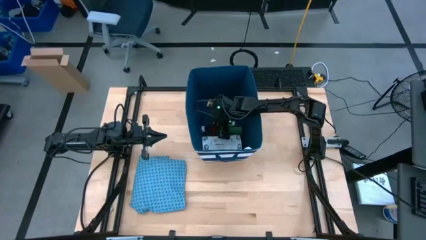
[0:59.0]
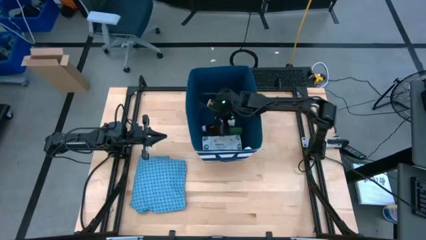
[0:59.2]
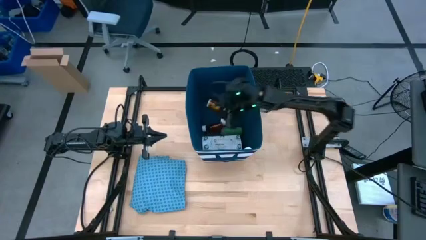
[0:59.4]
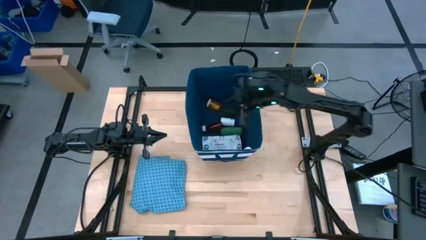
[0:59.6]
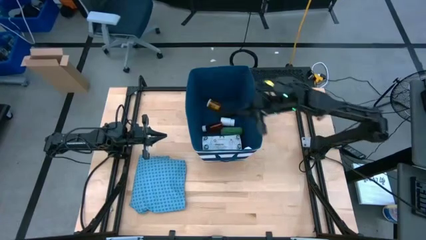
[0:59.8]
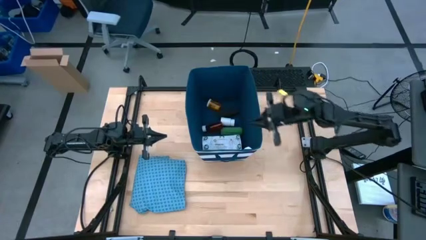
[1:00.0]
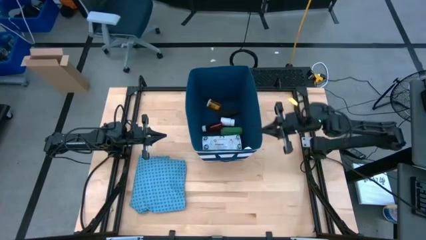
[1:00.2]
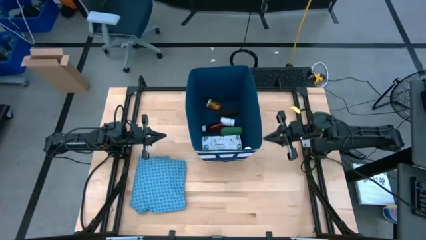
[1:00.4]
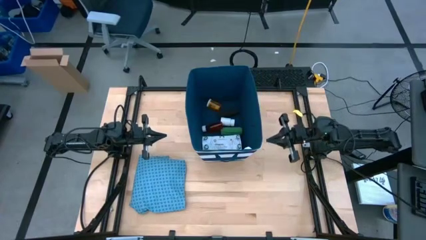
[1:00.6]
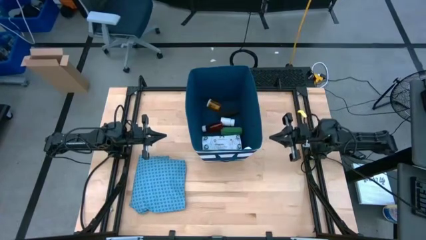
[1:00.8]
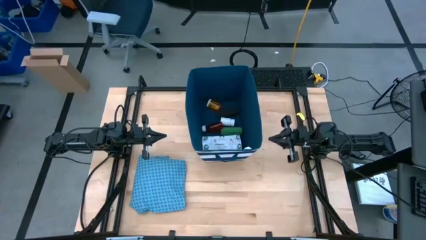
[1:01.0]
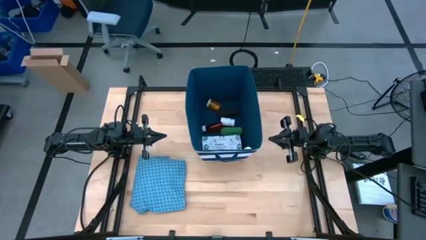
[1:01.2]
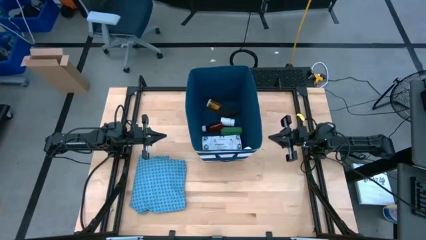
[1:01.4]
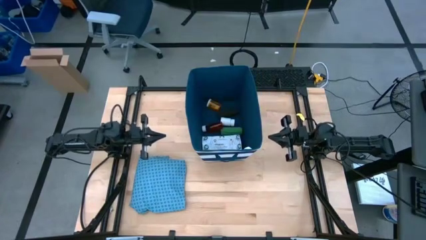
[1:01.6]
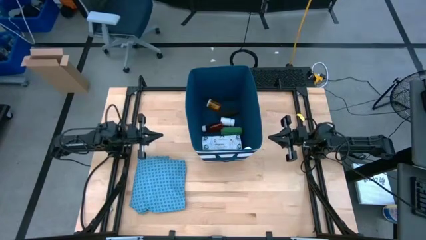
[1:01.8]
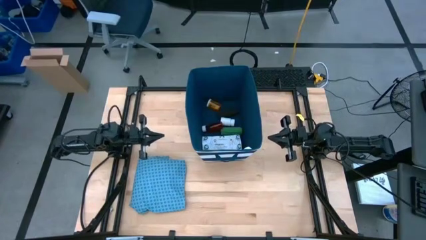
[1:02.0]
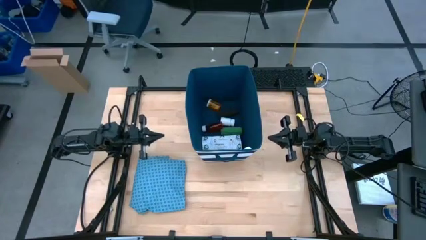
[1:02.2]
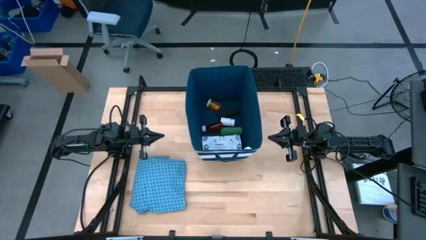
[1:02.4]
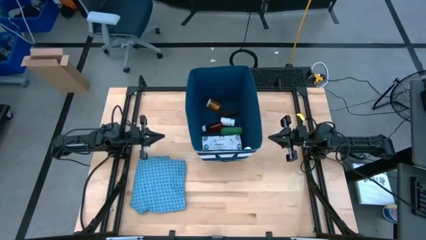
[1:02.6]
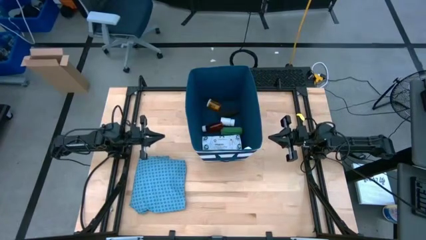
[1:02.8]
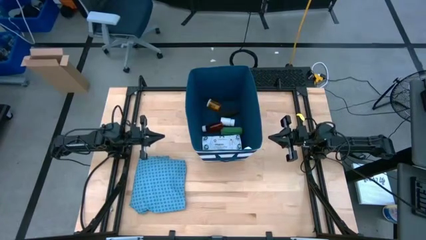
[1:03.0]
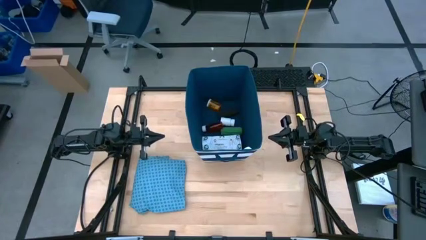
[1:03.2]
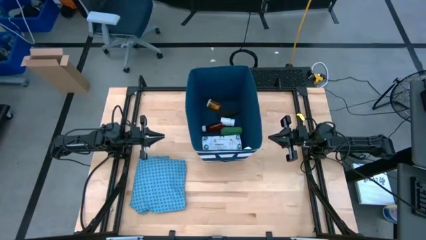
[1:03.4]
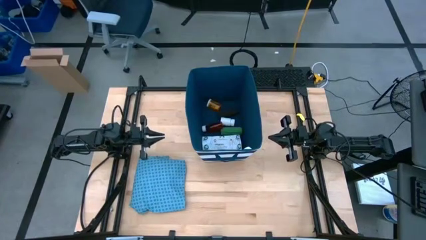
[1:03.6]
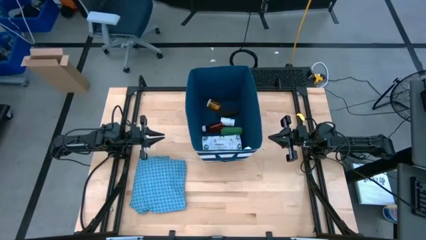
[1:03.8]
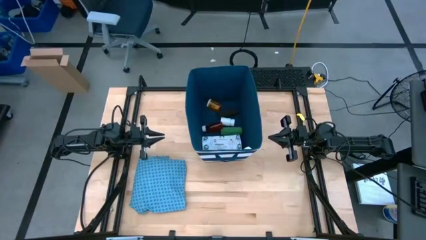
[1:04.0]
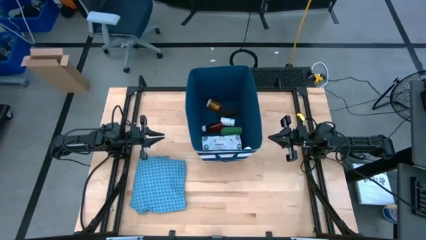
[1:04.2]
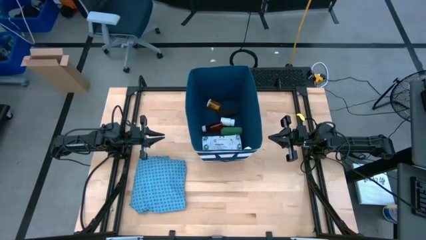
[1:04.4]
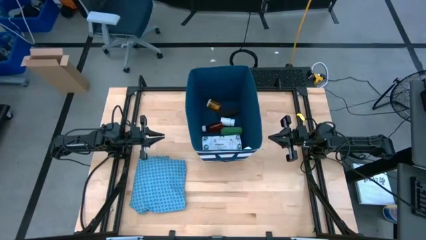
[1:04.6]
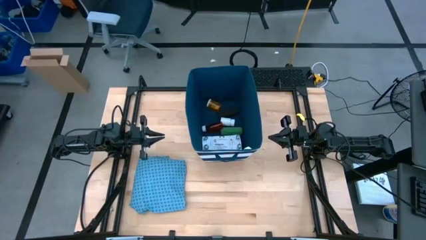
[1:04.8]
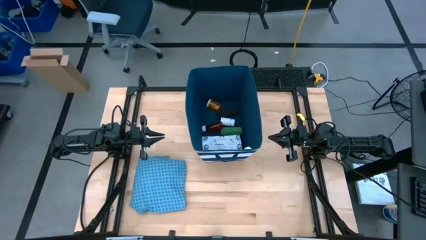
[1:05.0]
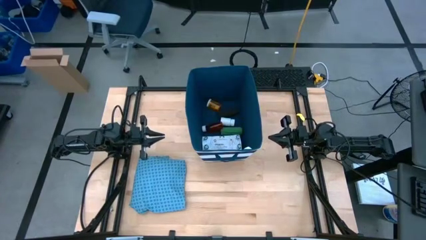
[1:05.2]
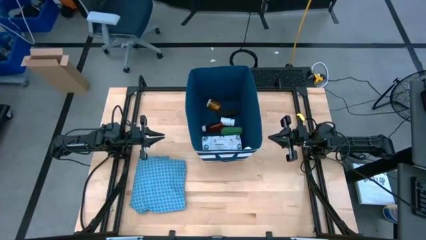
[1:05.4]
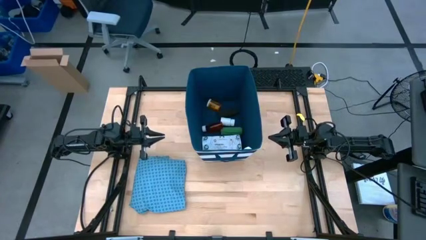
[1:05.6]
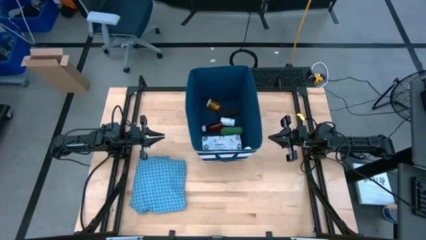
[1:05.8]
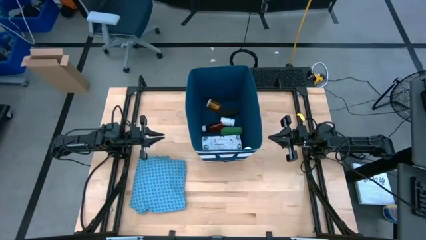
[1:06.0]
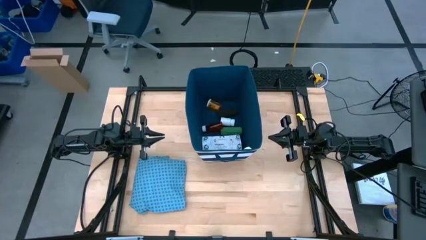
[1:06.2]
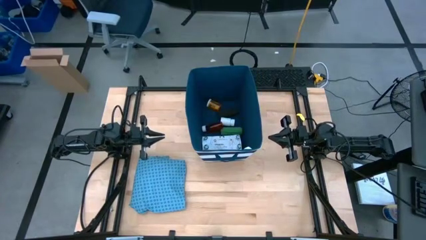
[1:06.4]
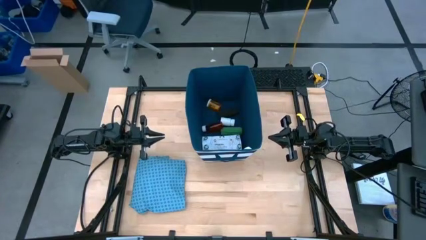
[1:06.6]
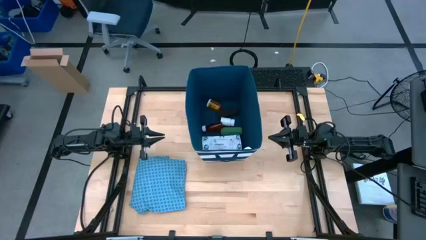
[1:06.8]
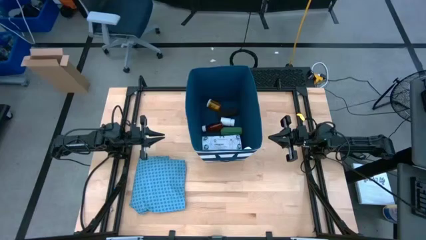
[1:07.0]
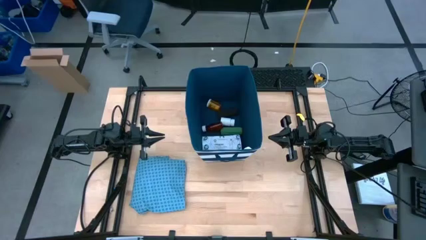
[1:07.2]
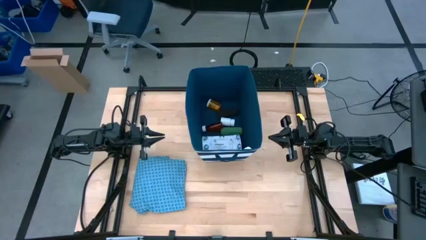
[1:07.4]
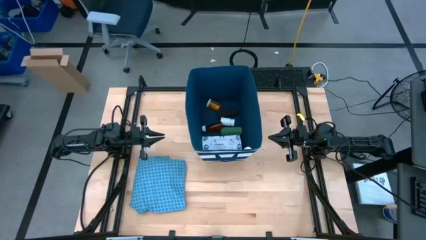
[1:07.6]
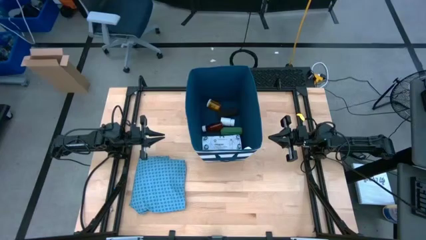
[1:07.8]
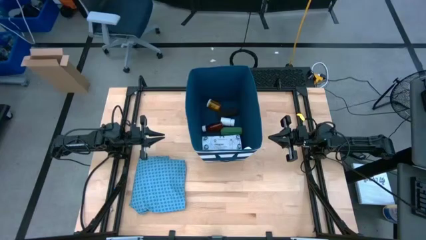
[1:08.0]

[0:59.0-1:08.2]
Task: Pick & place medical supplies in basket/bin
Return to Home Position

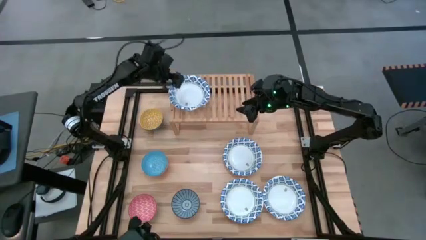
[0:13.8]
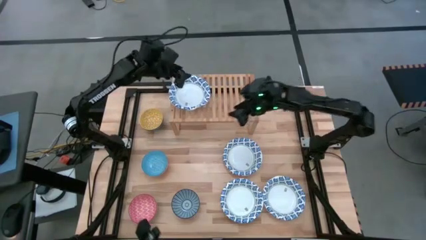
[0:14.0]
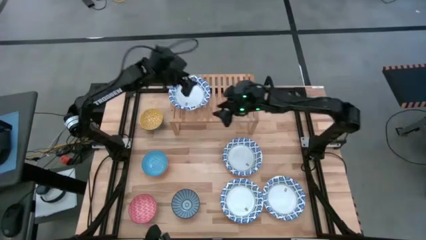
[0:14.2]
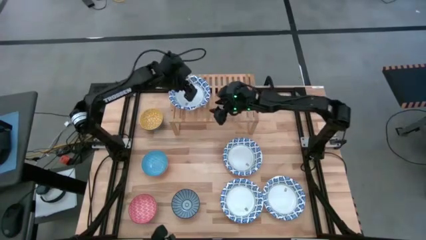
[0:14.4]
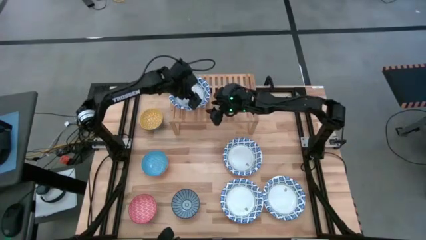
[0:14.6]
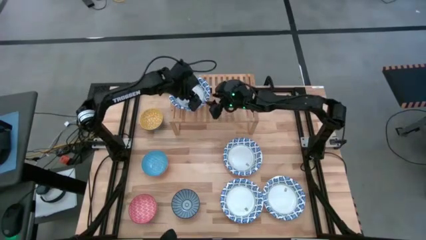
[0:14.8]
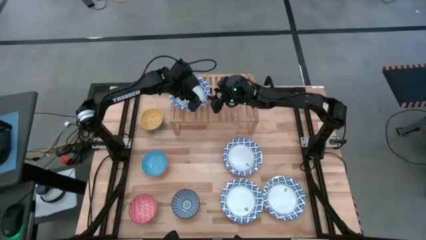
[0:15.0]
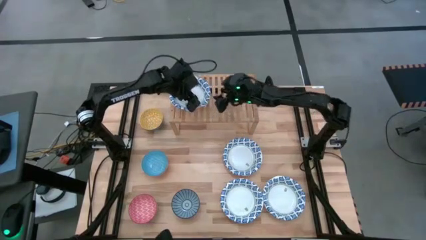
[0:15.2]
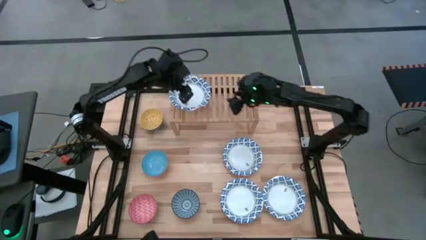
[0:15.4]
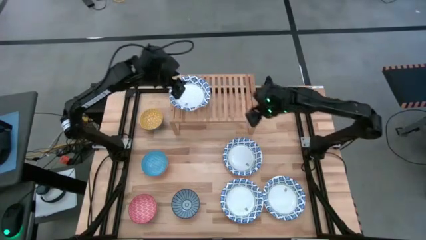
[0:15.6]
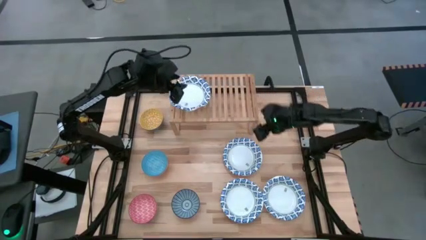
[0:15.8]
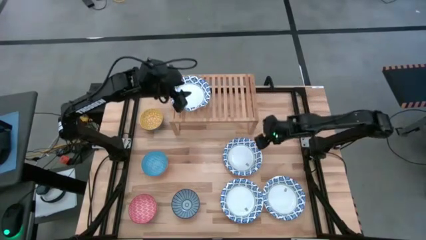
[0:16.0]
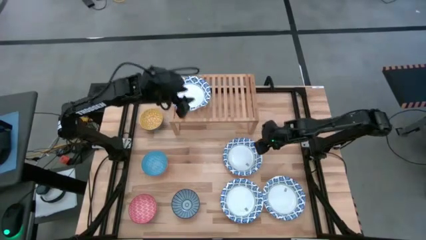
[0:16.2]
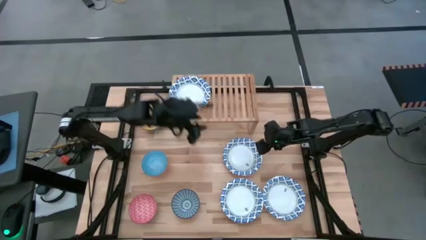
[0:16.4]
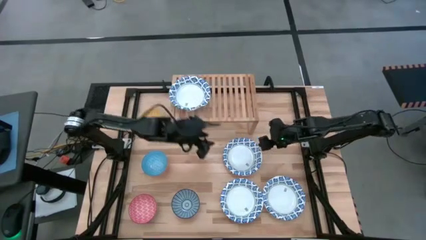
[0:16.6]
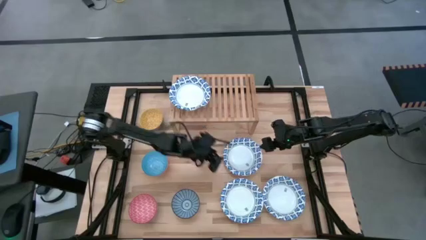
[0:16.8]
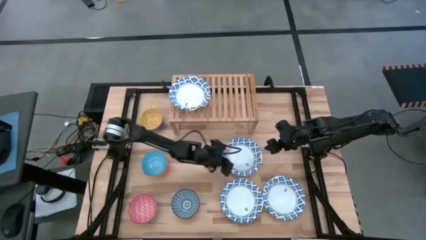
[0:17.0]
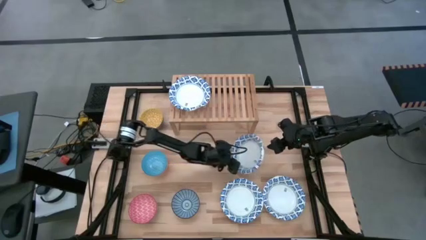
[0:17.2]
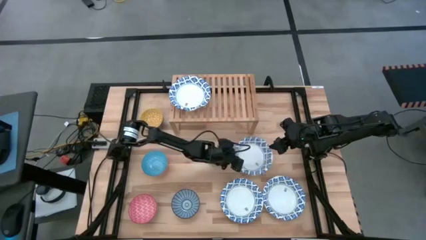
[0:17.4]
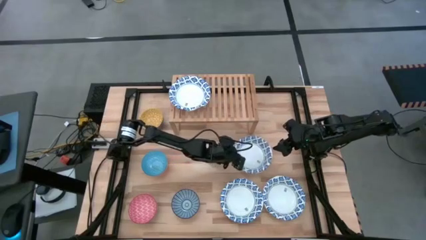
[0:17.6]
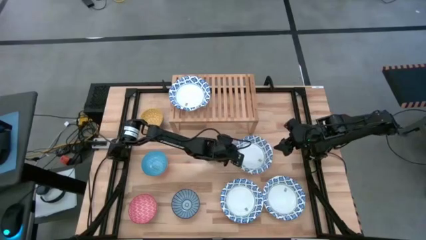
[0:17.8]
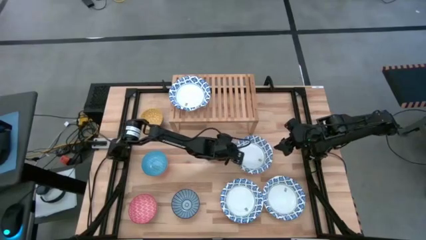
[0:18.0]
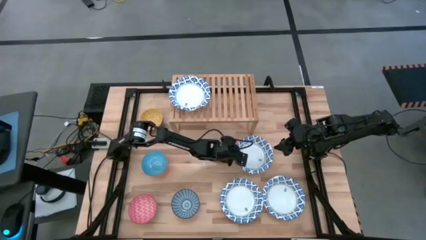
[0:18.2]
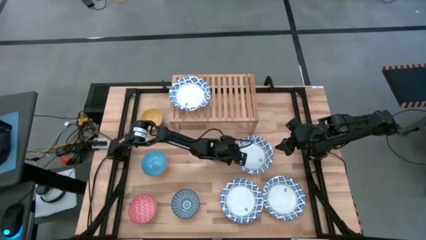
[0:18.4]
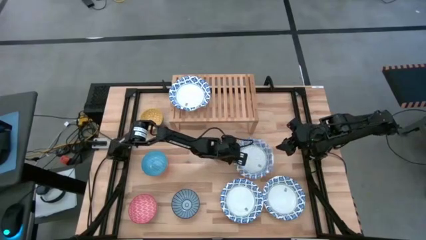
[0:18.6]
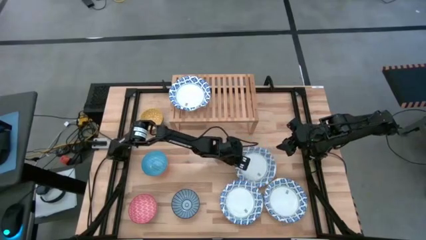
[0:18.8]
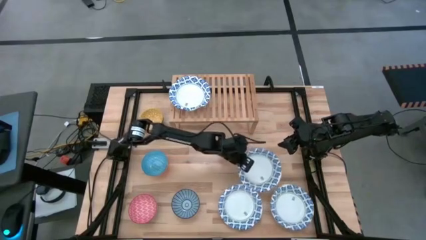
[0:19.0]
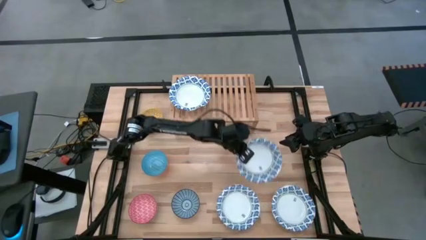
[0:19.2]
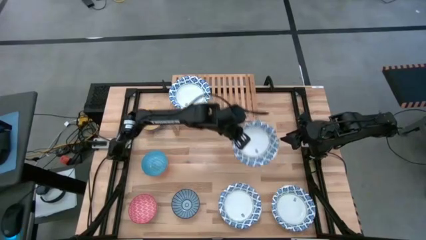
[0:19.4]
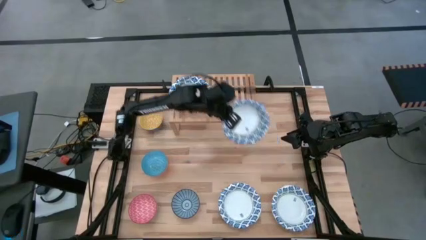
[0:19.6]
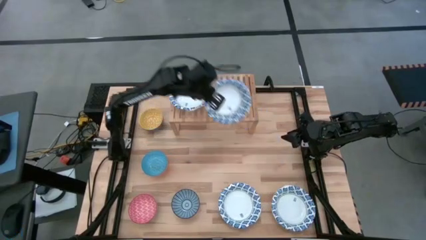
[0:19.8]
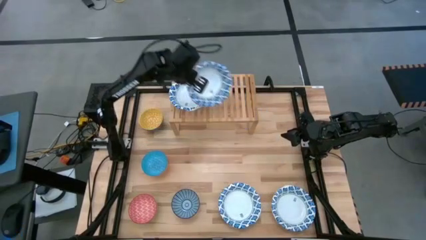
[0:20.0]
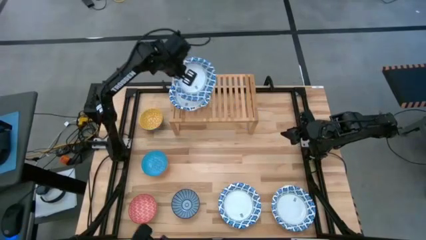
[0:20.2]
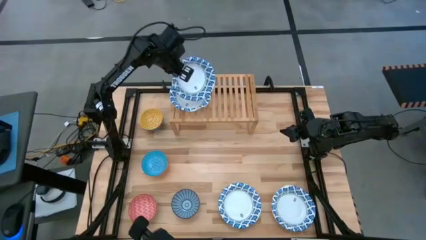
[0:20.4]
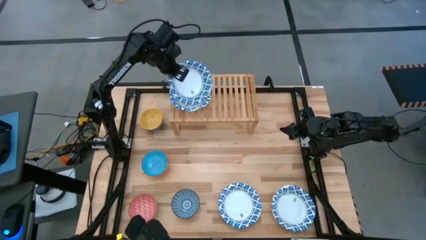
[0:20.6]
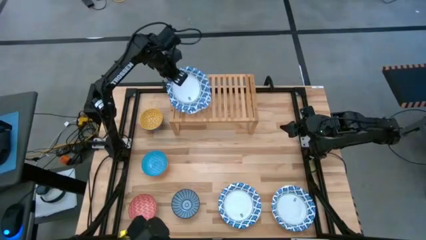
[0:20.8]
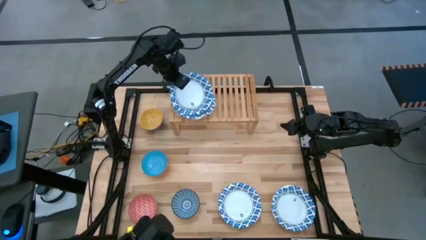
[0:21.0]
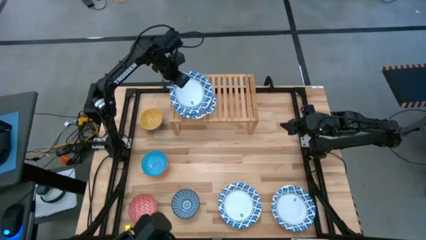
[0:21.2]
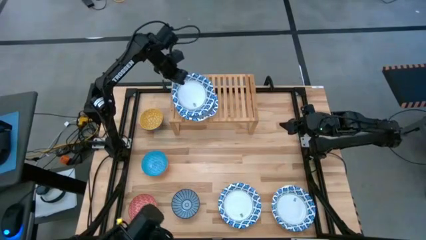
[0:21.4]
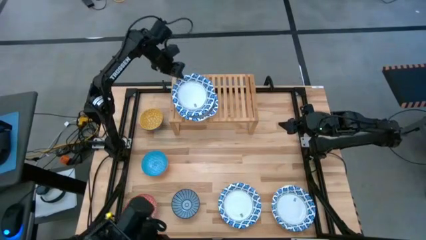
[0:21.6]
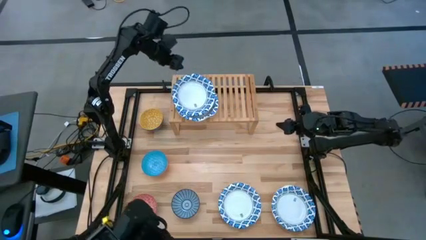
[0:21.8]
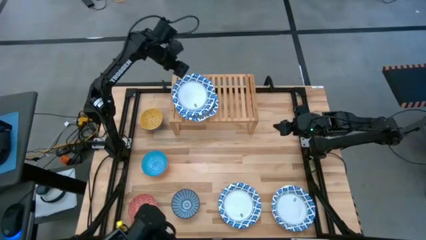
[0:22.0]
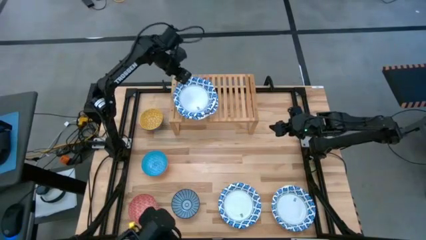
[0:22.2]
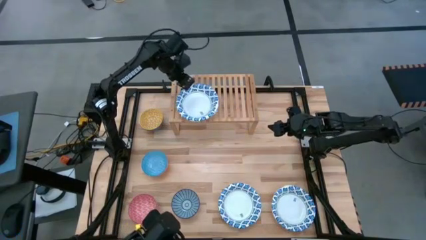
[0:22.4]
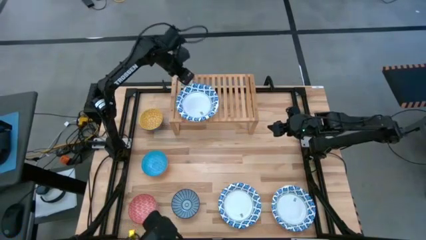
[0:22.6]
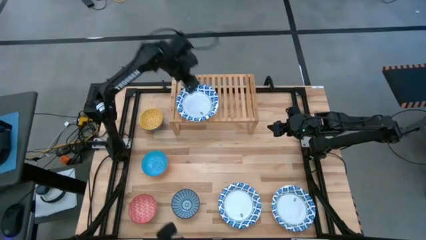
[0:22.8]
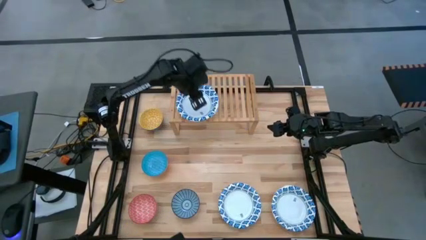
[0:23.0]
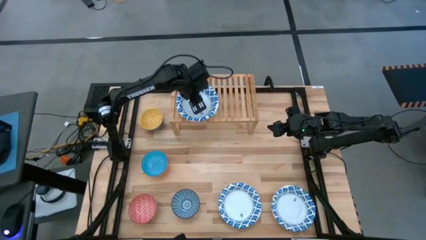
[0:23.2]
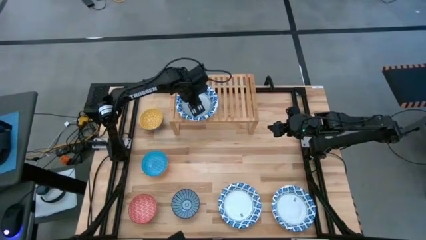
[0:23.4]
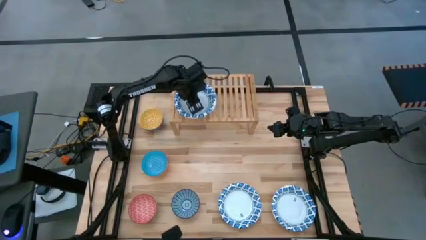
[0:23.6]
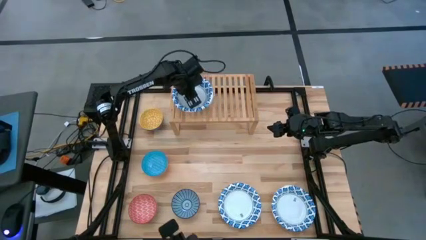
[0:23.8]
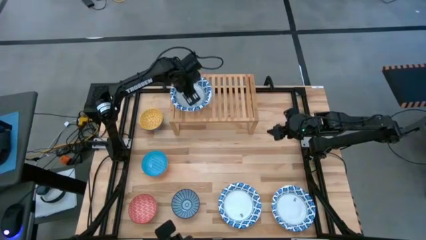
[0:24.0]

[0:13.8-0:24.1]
Task: Place and stack bowls onto a shelf
Stack the white patterned bowl on top of the other white patterned bowl on the shelf
